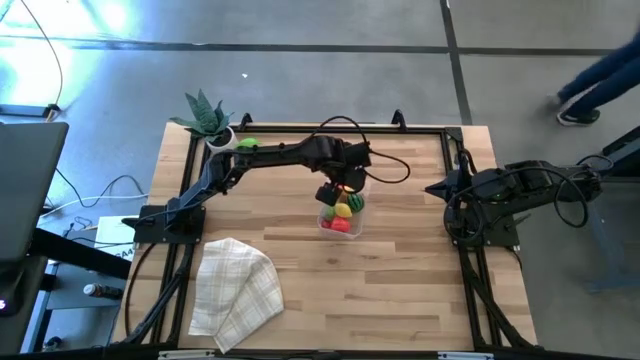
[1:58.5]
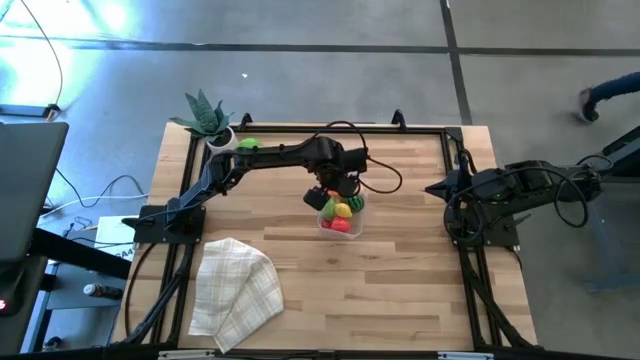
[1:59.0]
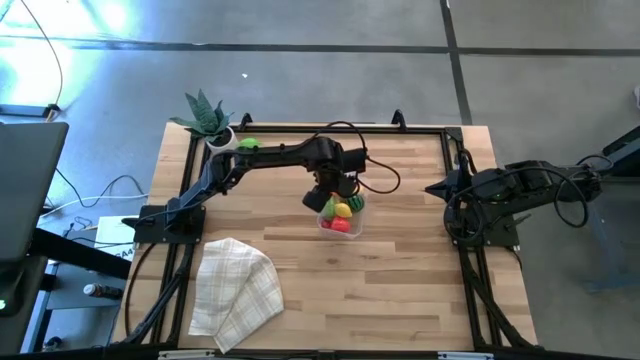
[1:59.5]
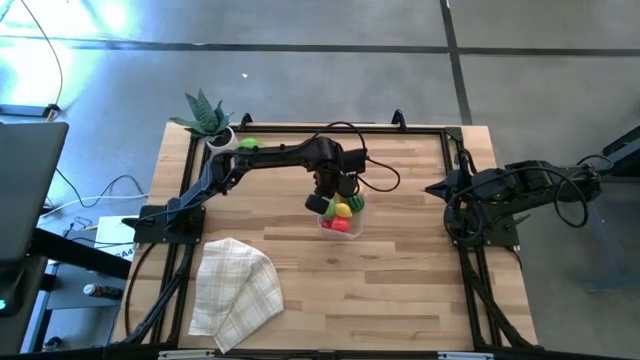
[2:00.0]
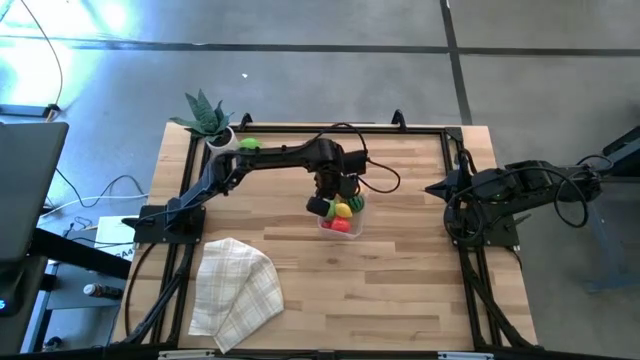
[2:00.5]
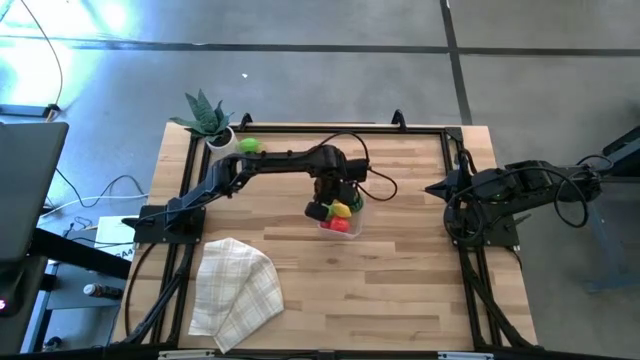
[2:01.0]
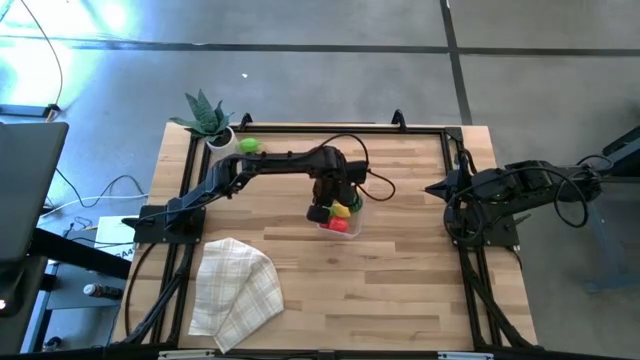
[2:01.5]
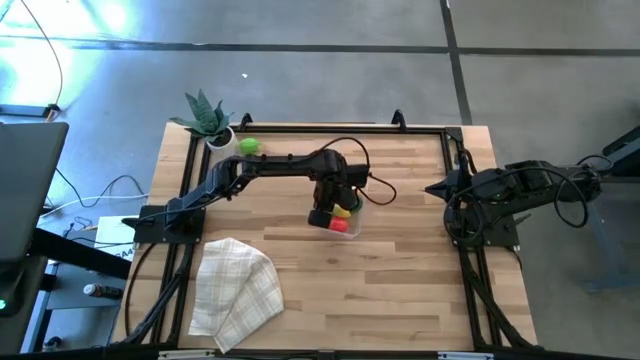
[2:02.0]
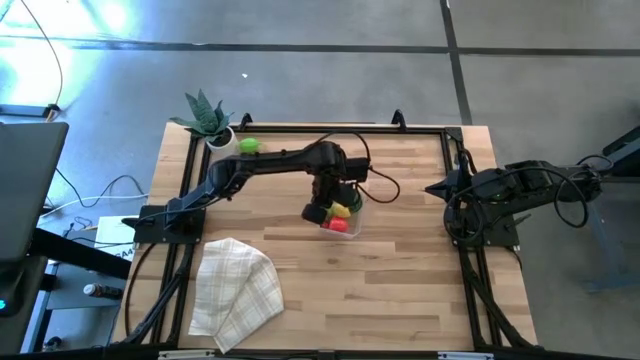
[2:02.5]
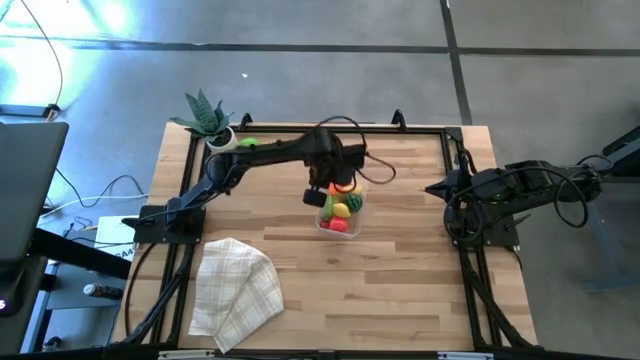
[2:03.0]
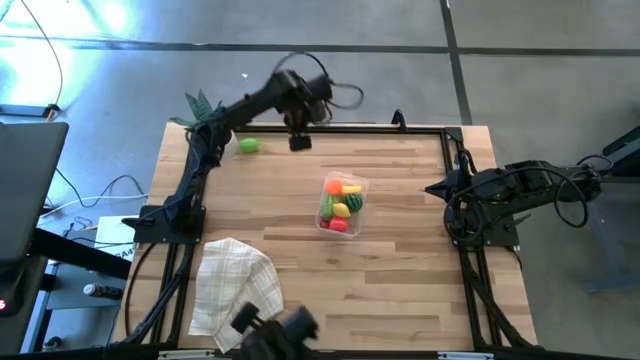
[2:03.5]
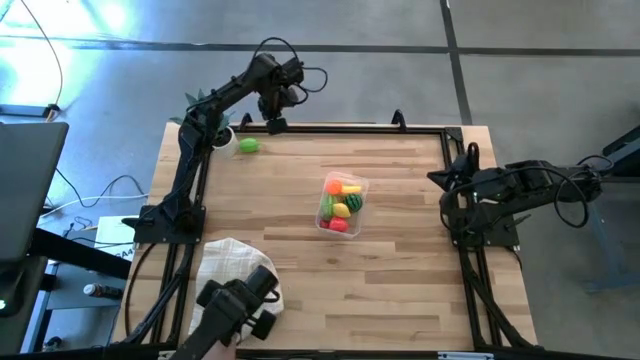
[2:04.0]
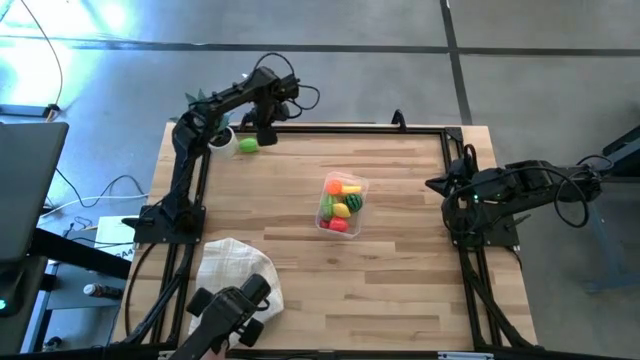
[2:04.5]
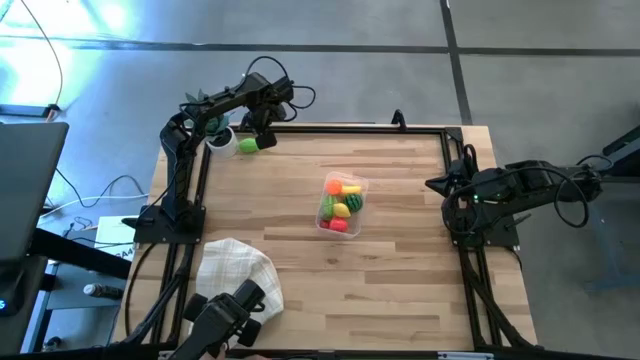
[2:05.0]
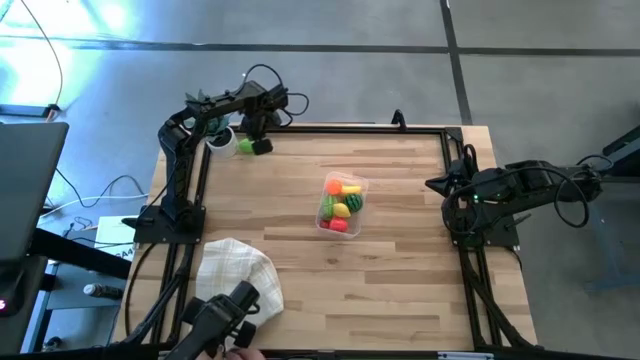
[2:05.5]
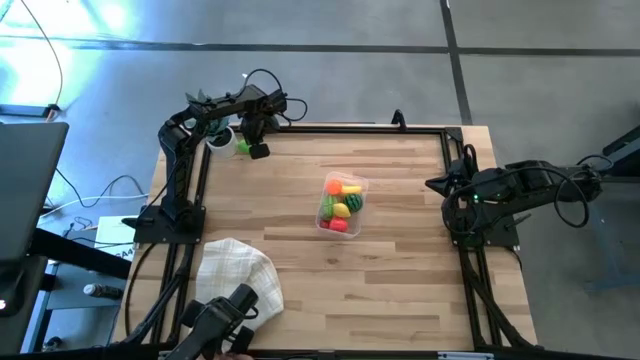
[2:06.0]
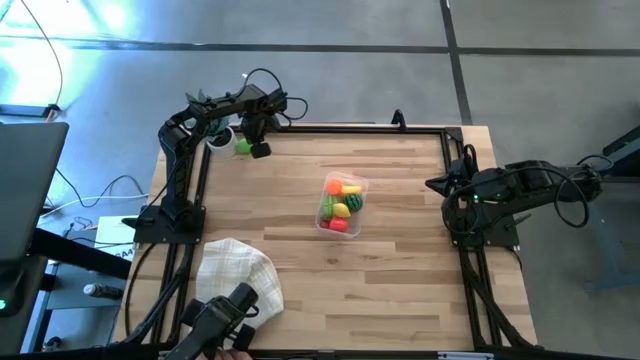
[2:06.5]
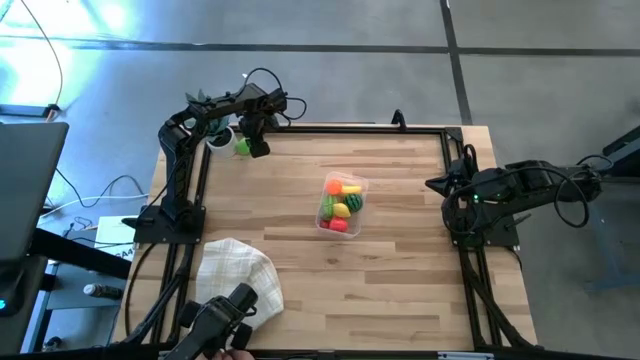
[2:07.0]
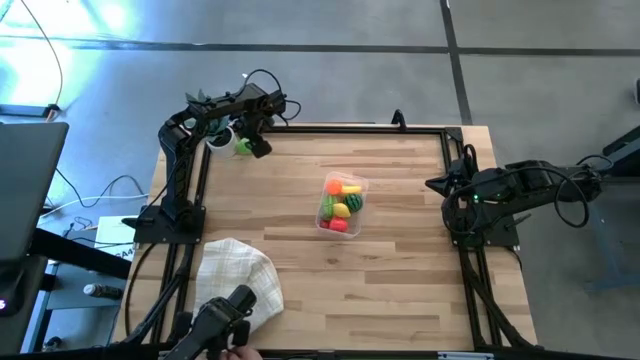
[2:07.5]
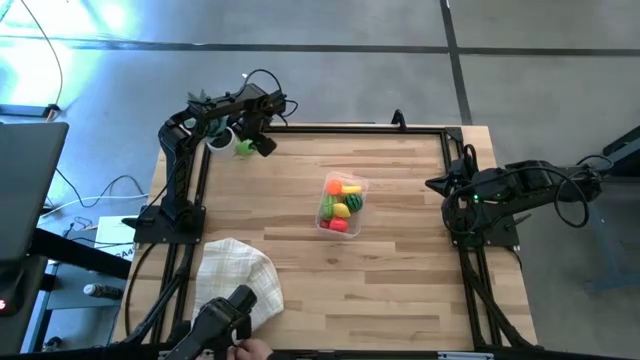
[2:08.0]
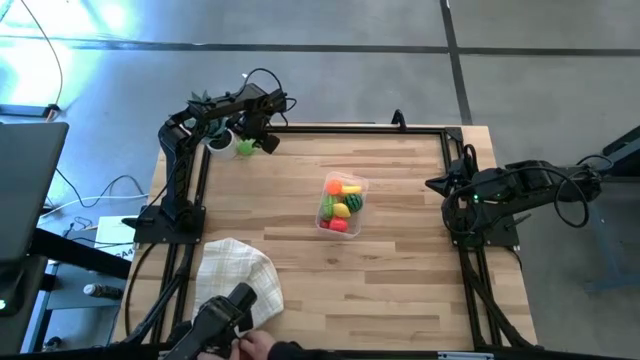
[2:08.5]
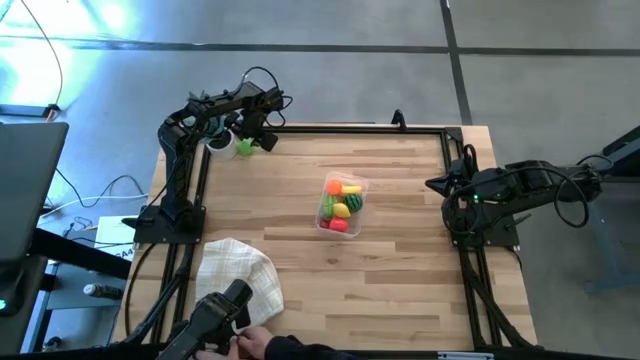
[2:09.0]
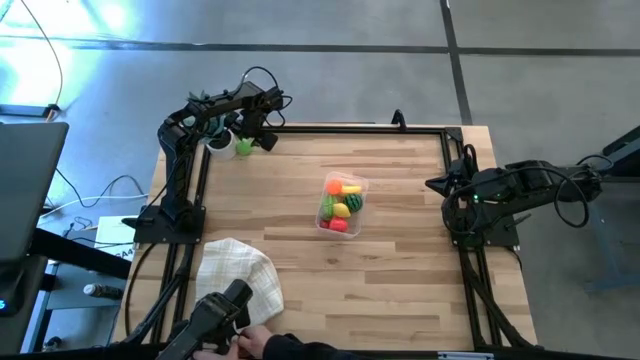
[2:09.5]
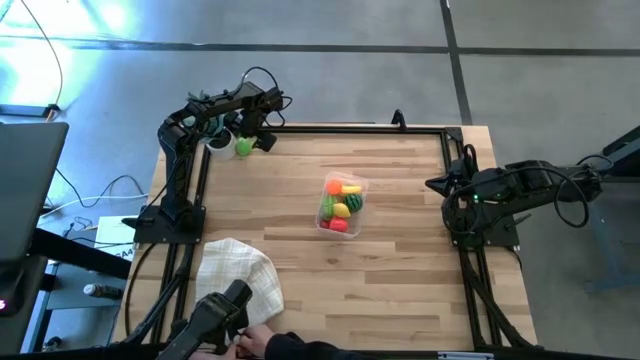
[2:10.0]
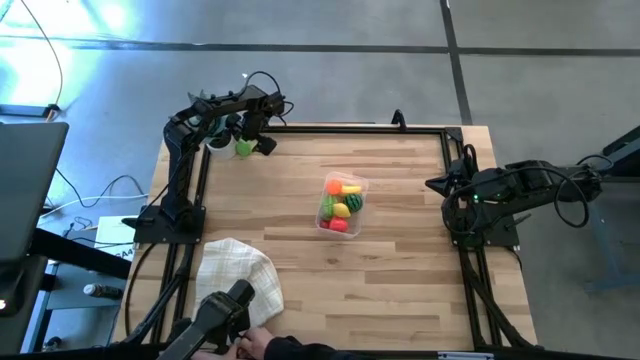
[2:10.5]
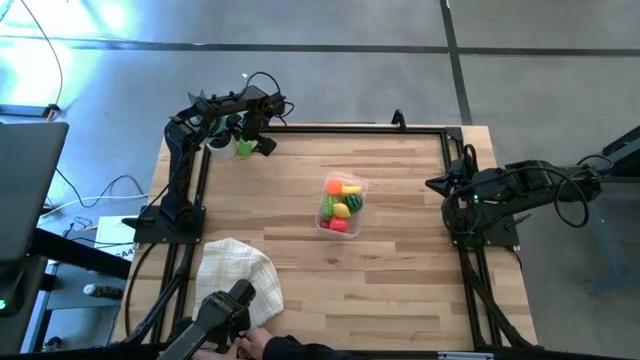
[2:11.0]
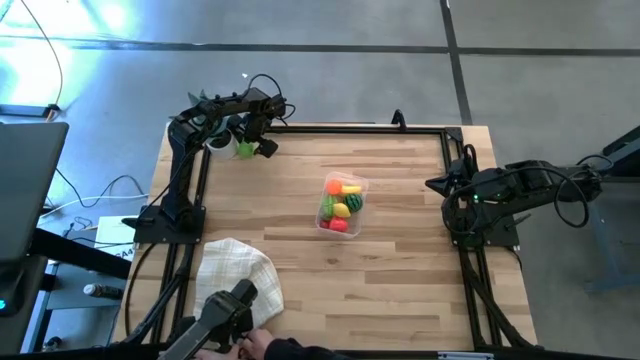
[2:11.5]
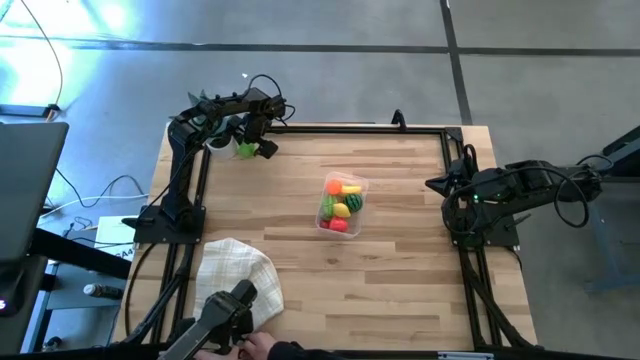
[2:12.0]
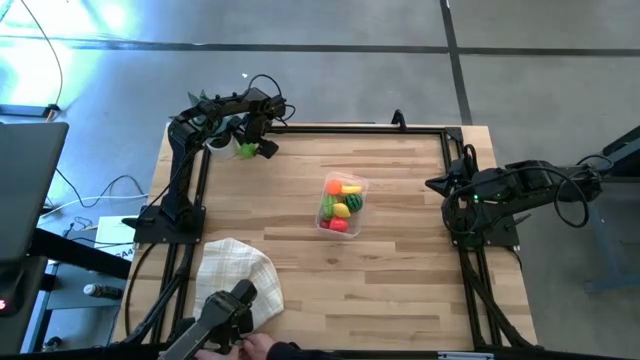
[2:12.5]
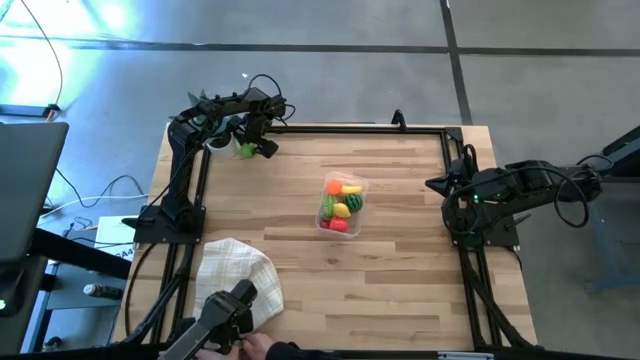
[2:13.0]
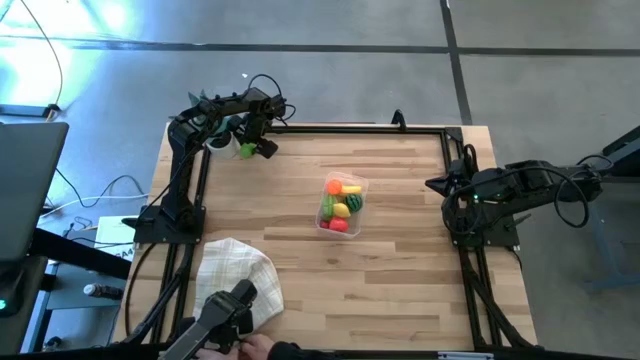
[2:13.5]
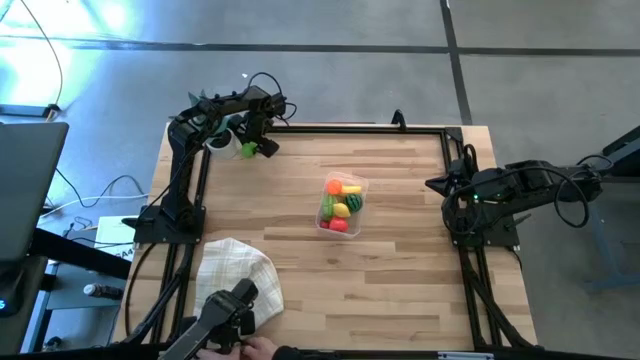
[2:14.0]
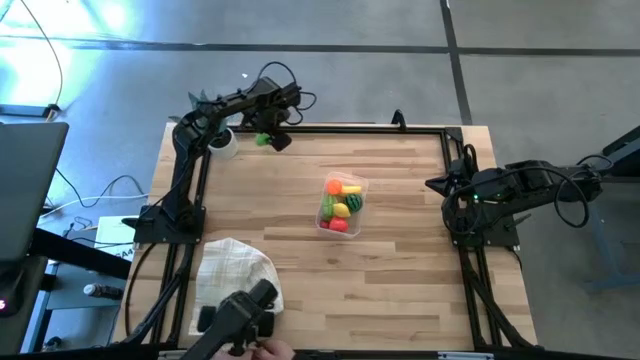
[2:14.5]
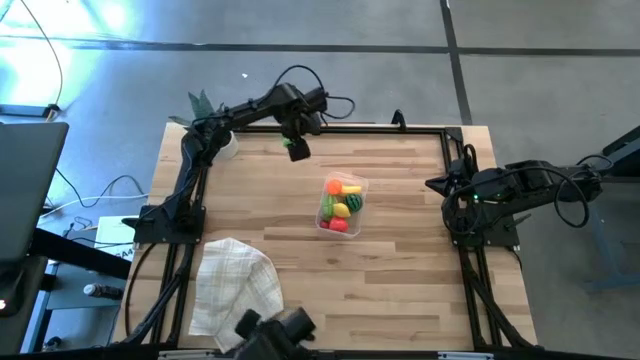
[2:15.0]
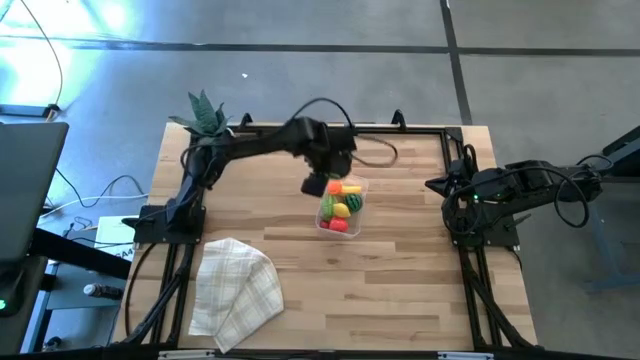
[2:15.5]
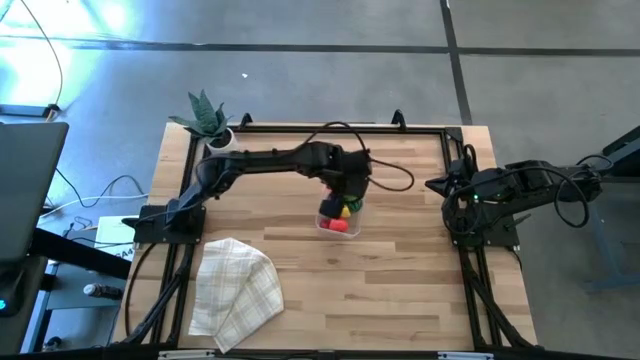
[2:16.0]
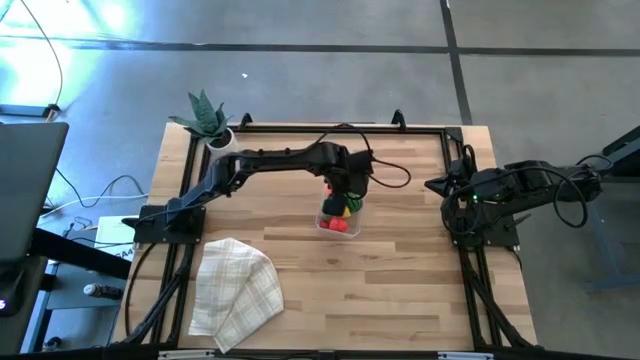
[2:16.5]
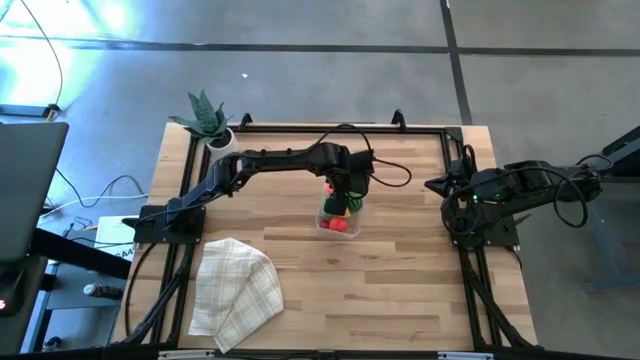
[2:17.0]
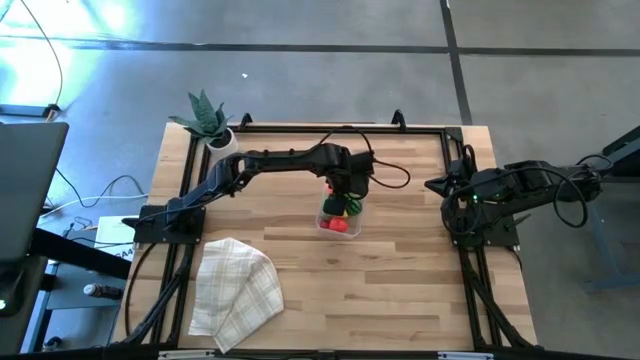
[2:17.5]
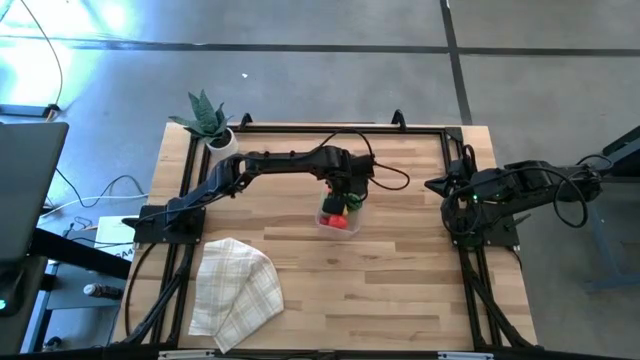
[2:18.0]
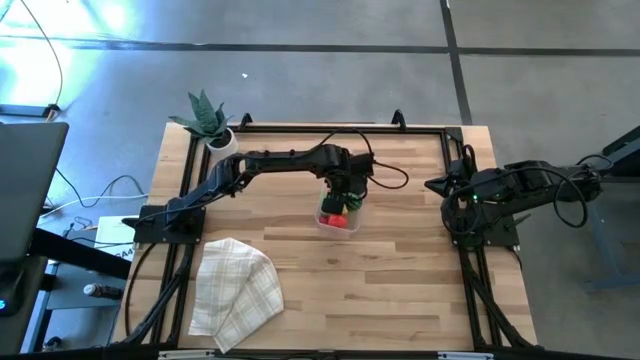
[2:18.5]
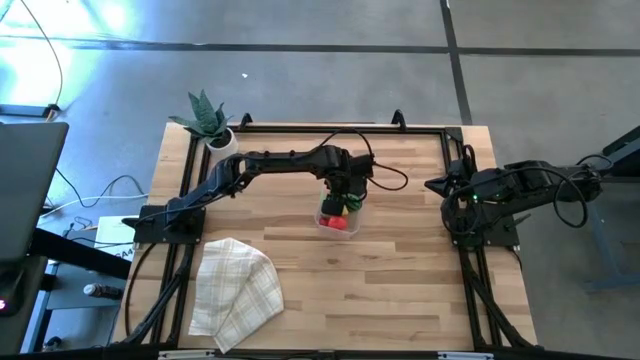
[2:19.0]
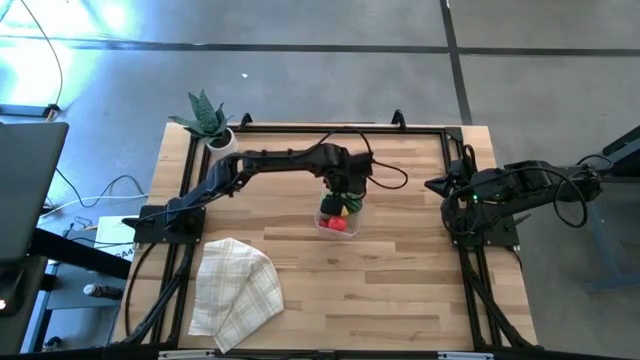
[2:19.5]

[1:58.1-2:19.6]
Task: Pick and placing Produce into tupperware
Put the melon into the transparent bin
